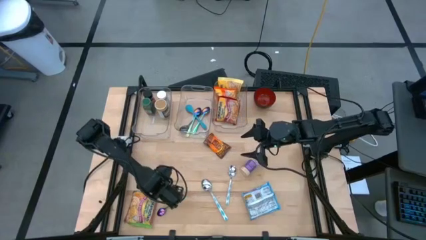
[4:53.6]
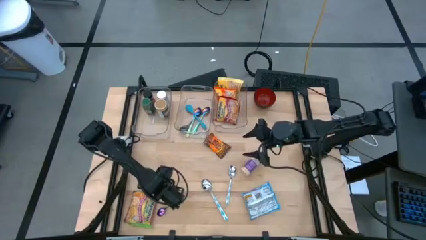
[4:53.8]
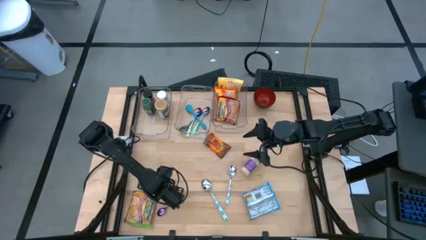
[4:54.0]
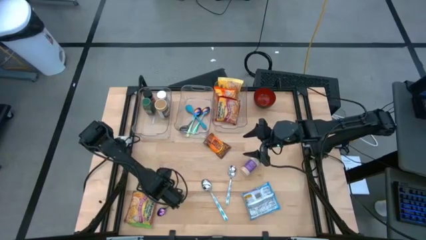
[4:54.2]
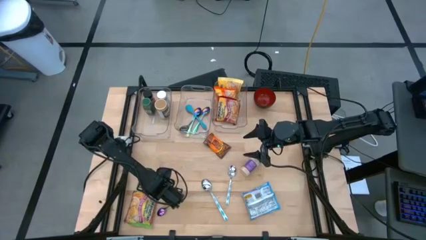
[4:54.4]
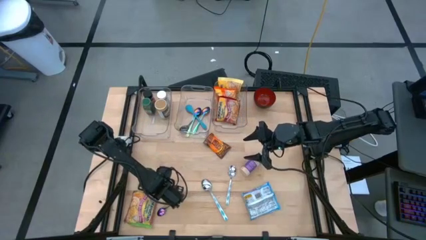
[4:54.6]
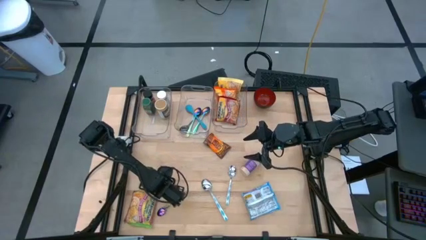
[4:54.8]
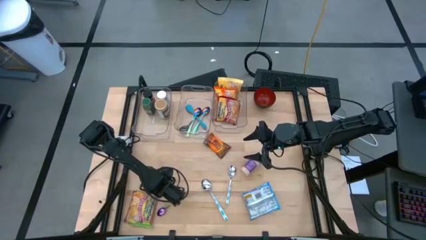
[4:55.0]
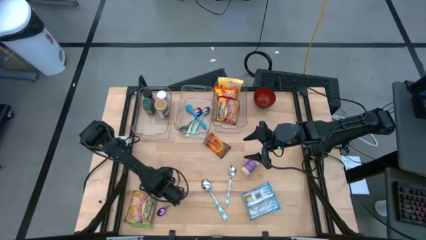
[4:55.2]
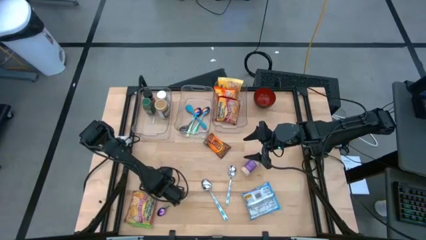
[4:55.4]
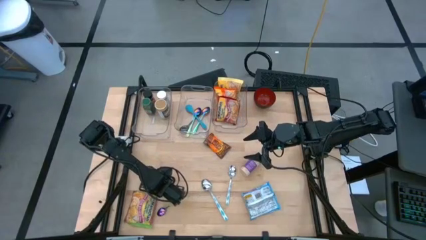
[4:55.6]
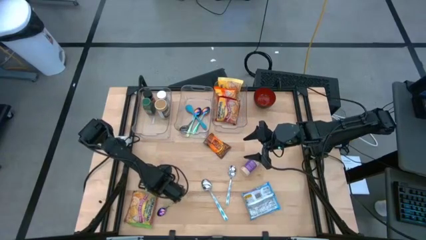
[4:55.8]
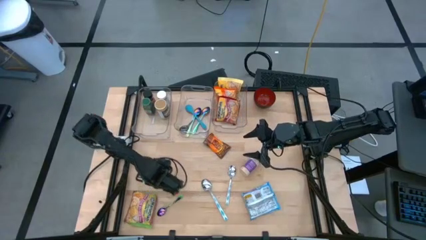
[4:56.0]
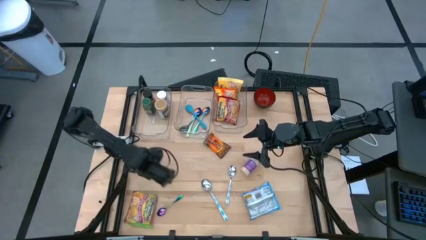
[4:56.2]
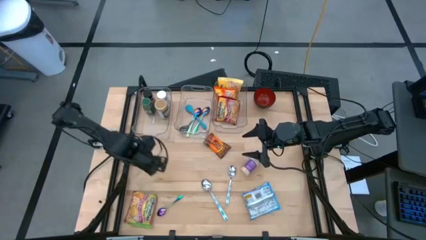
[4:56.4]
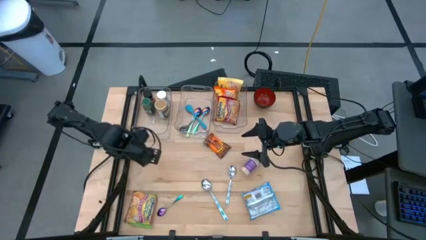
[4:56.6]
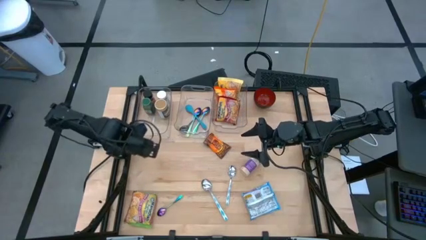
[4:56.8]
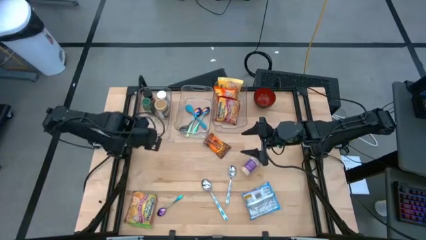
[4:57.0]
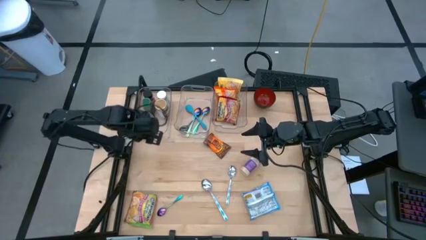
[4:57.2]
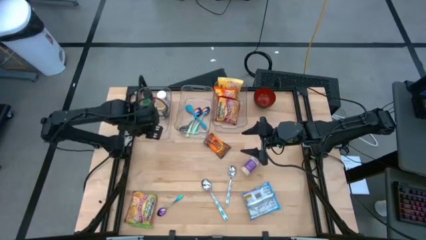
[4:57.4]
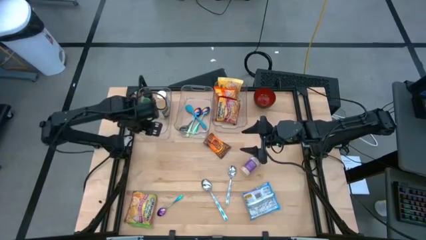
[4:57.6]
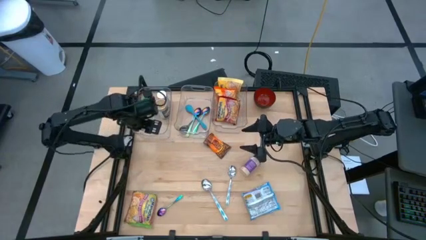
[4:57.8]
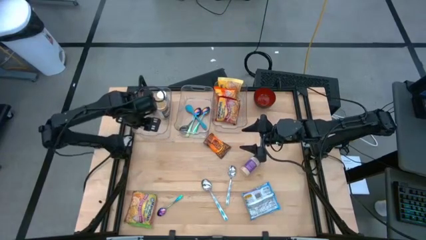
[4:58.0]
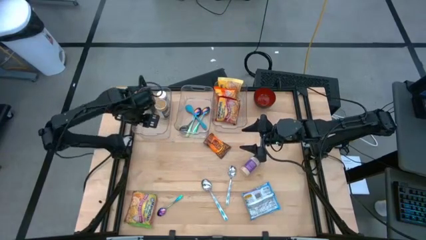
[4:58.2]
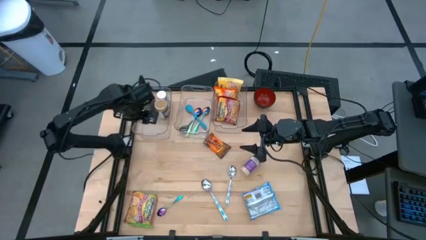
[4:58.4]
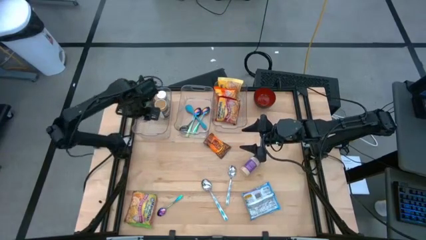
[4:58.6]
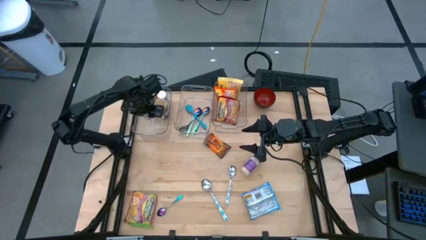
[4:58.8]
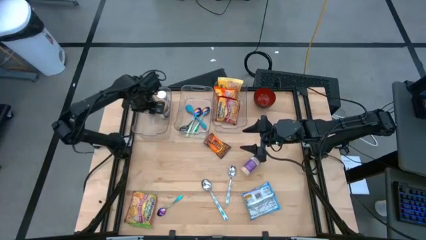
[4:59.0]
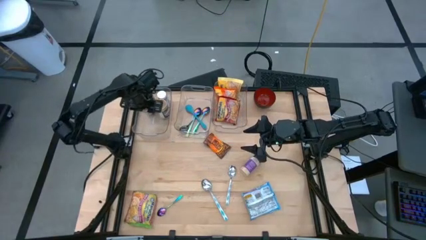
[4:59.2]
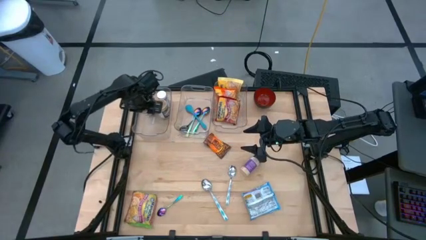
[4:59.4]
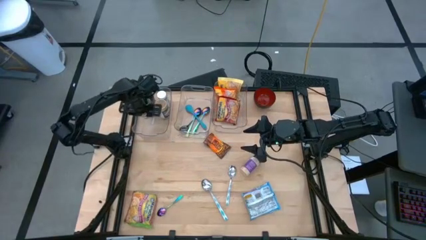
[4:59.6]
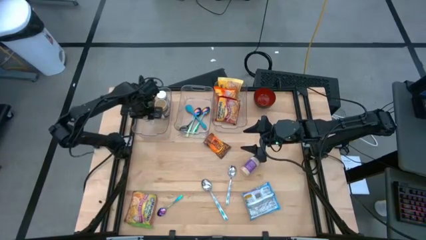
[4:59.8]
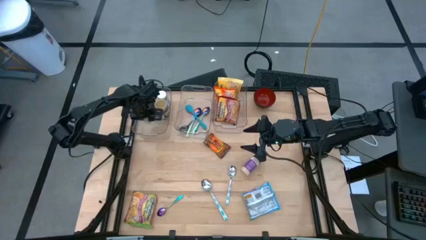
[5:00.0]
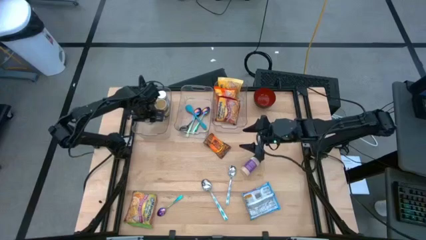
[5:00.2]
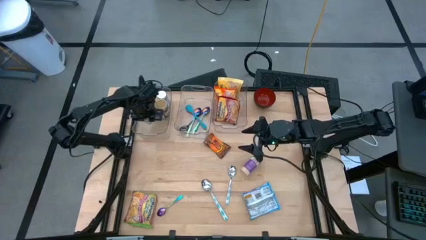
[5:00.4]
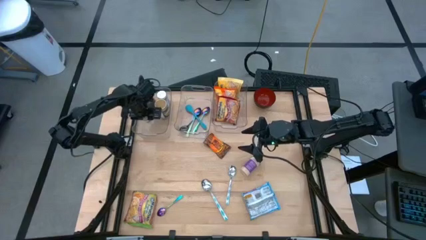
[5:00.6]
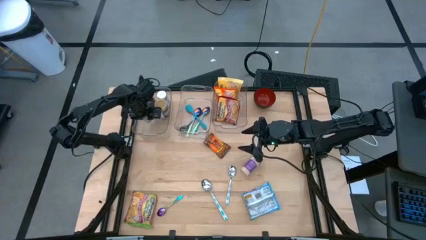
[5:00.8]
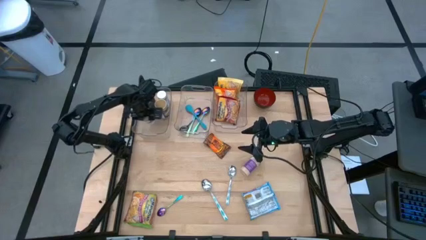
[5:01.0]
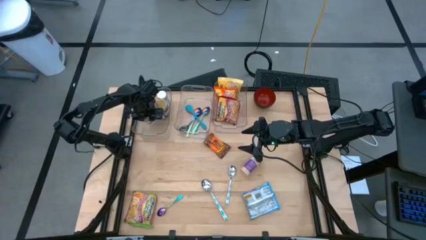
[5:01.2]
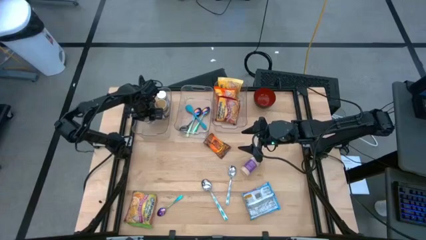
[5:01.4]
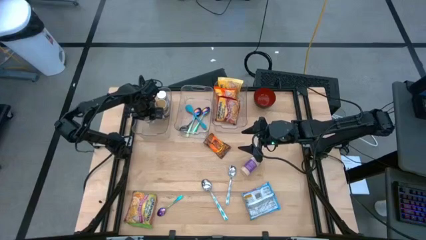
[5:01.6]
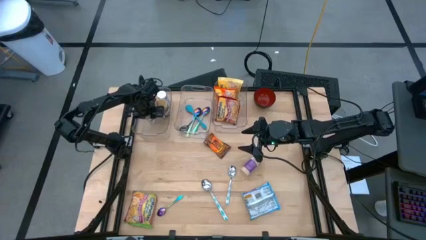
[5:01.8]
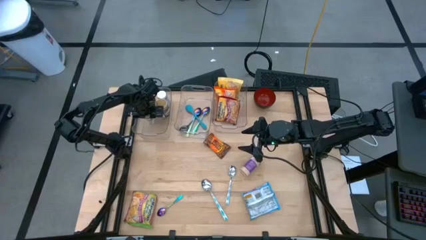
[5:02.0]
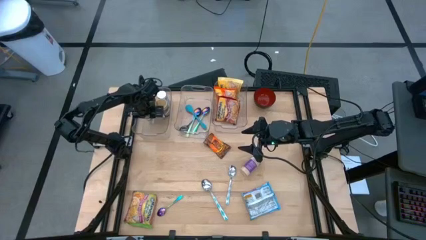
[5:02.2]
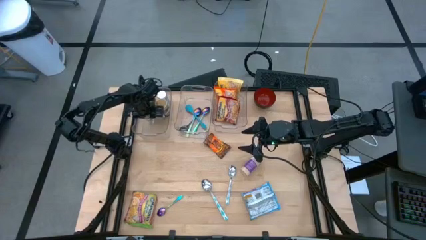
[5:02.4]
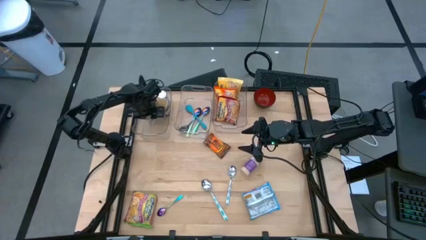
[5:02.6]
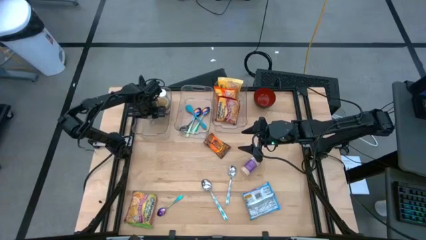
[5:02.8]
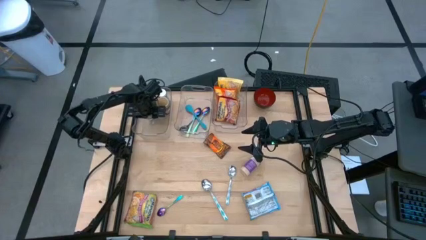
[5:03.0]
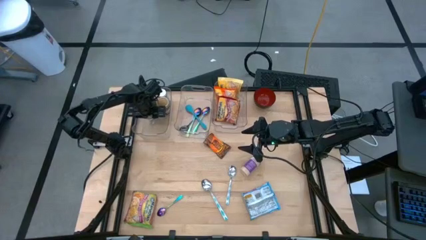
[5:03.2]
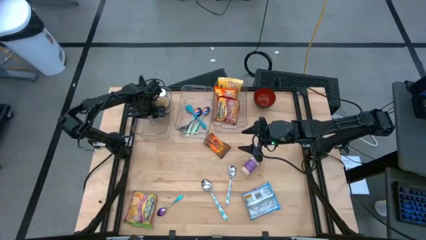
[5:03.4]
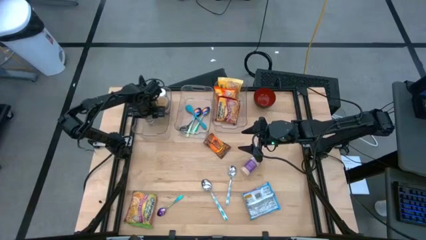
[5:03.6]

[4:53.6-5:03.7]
Task: Pick & Place Food Item
Put the brown spice bottle into the left transparent bin

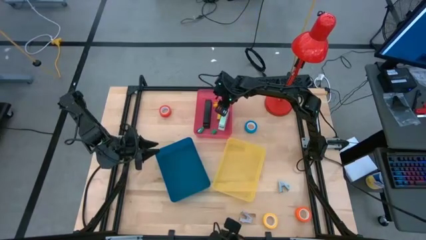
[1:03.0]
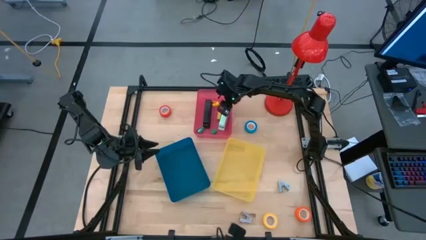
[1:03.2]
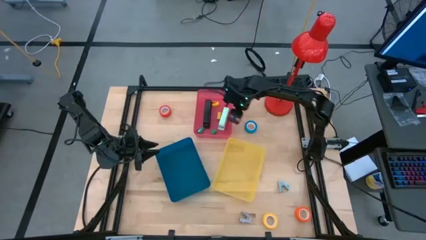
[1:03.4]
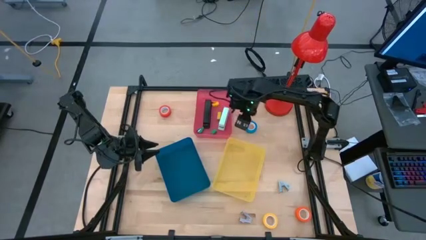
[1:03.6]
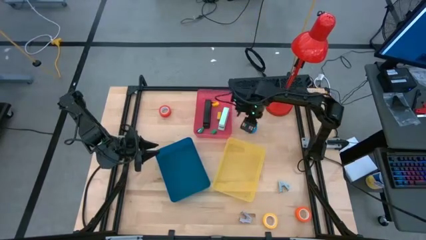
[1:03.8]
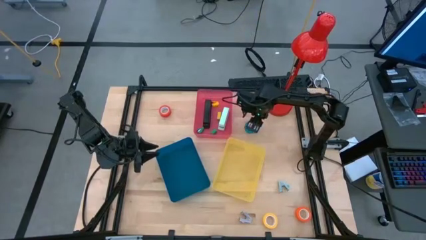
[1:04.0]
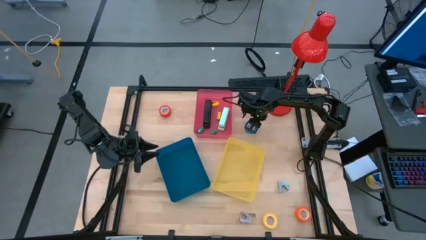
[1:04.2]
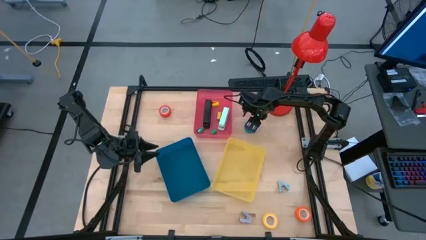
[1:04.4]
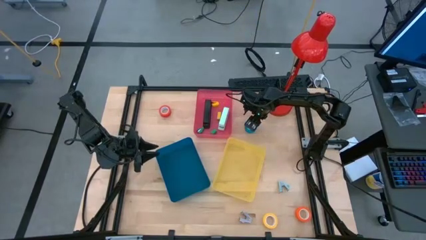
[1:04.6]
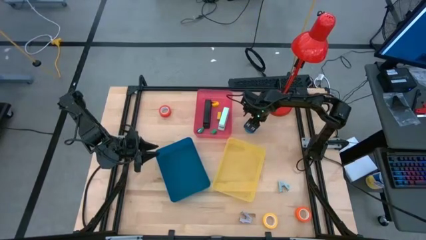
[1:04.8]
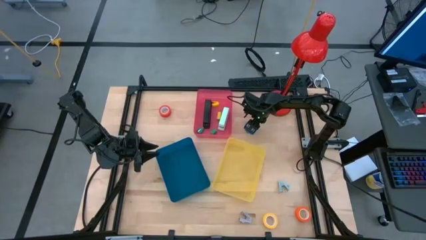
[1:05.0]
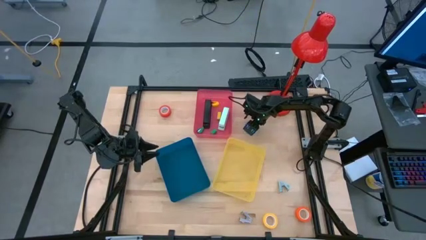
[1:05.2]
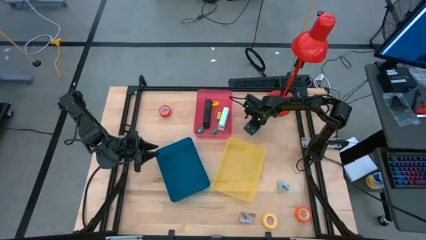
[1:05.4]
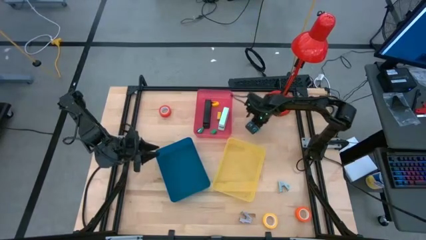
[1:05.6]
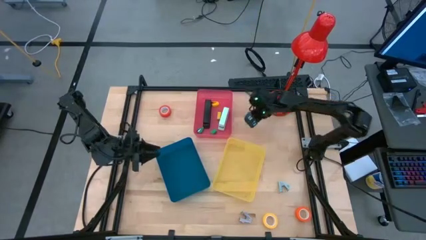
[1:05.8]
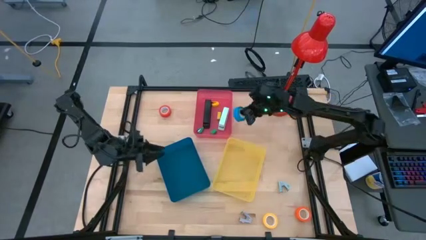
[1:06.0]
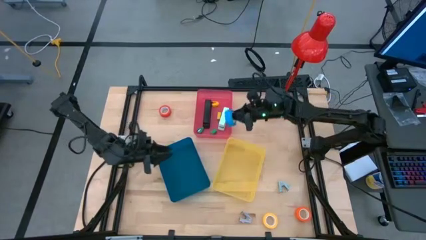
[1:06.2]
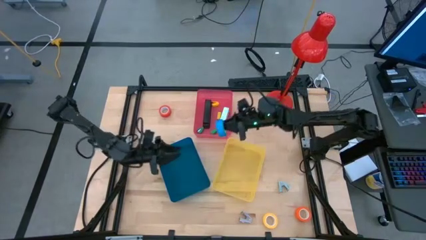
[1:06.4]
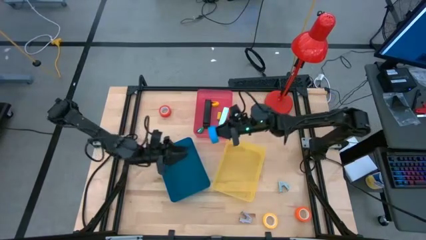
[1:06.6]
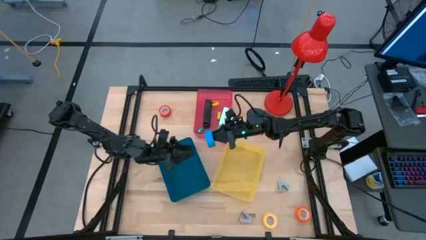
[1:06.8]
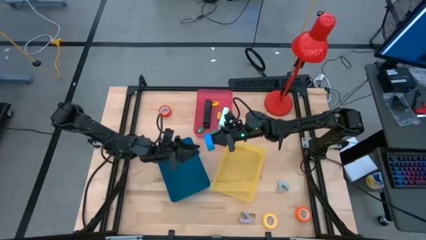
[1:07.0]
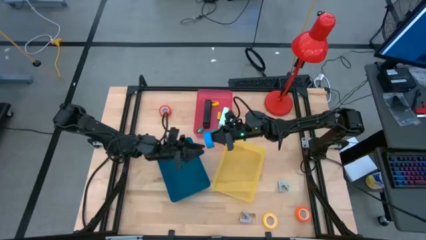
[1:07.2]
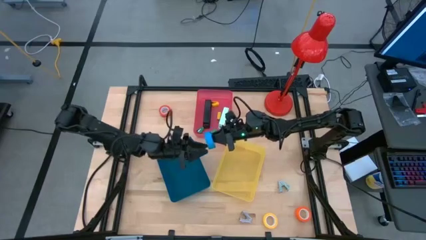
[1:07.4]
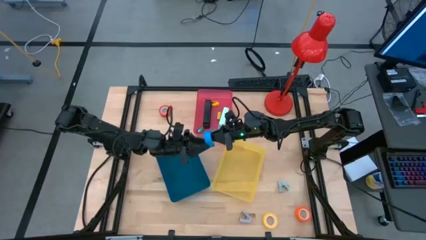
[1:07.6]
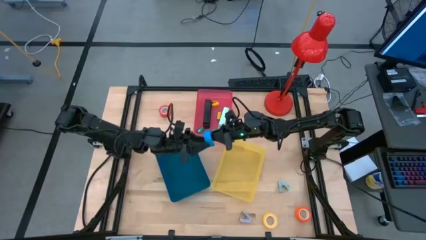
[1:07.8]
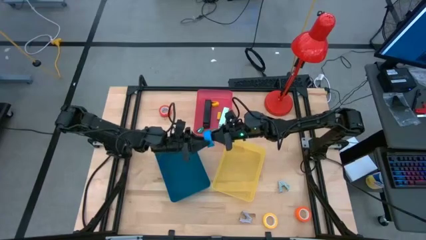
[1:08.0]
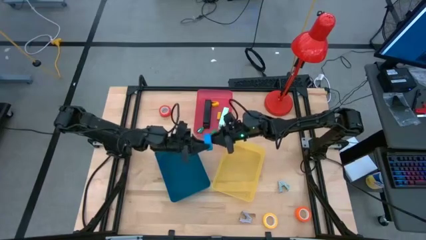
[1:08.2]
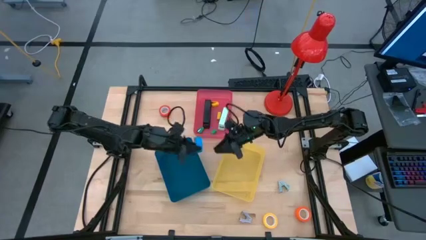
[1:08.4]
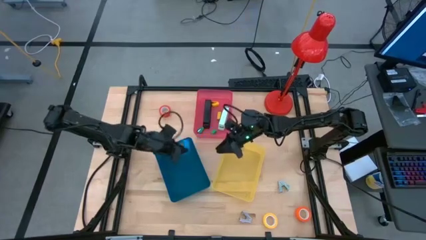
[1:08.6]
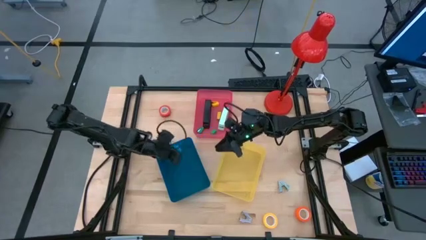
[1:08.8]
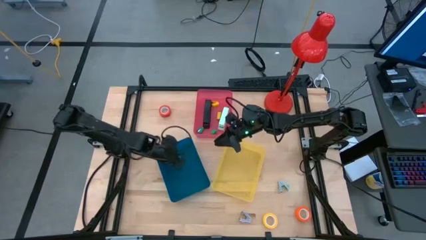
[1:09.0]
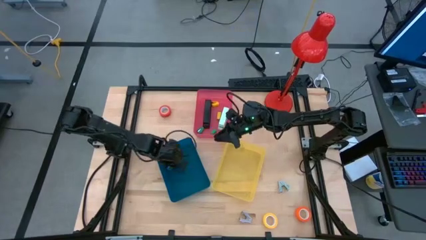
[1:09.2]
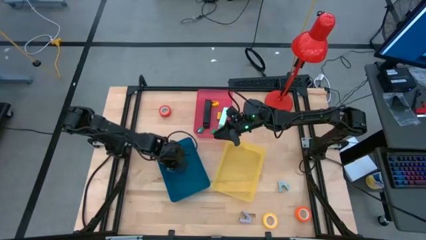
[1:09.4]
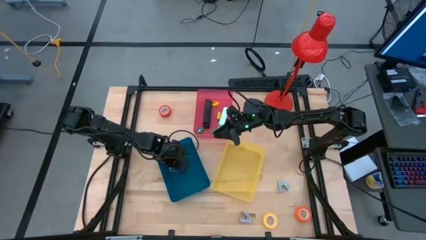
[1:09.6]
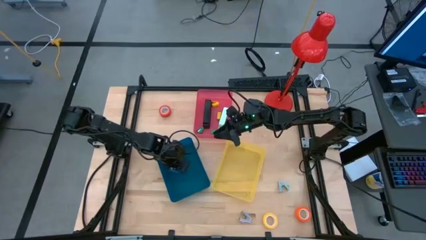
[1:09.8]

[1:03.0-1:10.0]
Task: Pick and place Stapler, Stapler remover, tape
Put the blue tape into the blue bin
